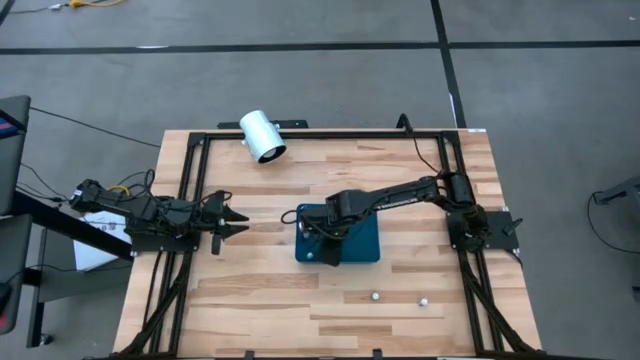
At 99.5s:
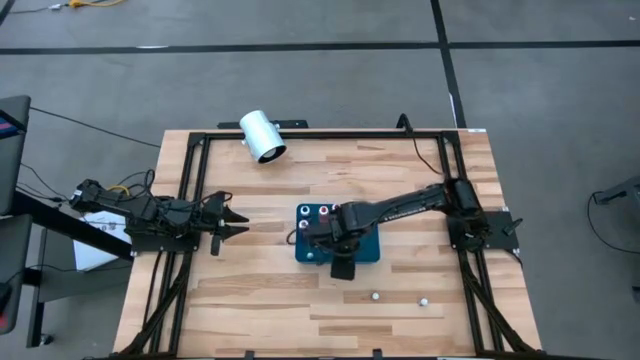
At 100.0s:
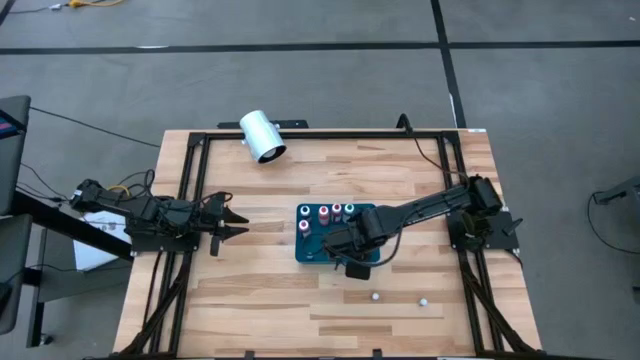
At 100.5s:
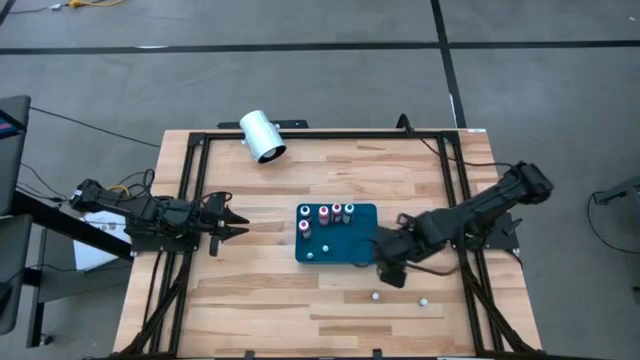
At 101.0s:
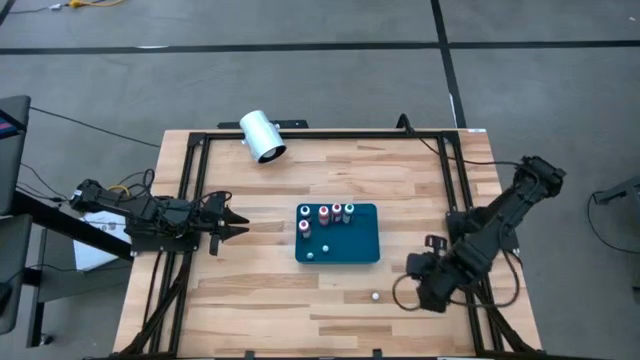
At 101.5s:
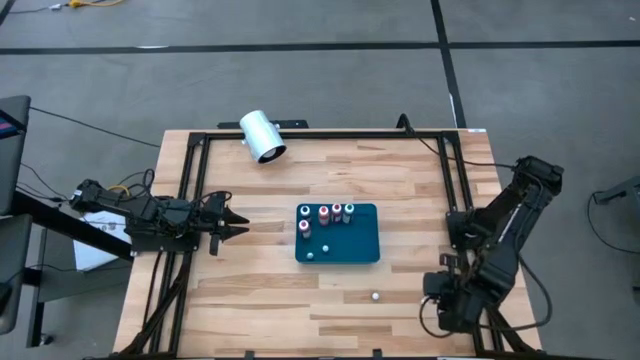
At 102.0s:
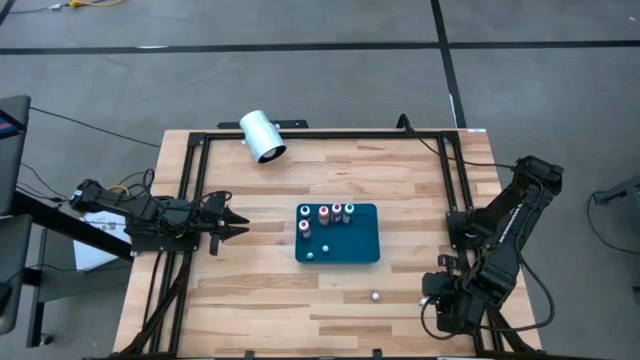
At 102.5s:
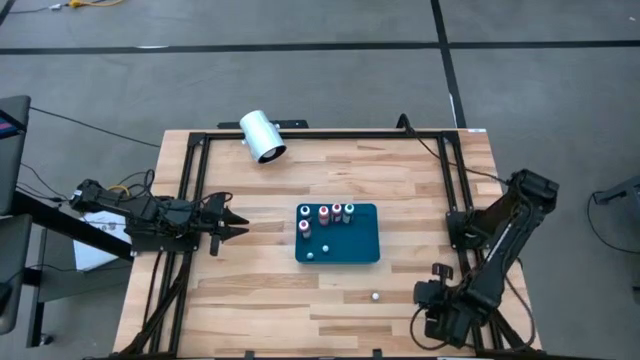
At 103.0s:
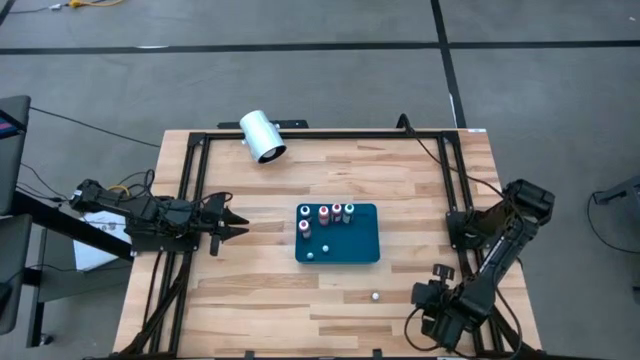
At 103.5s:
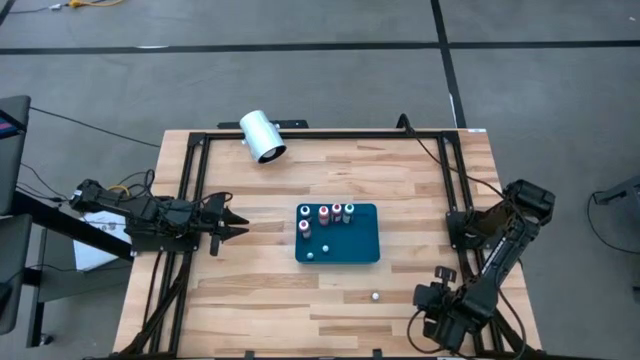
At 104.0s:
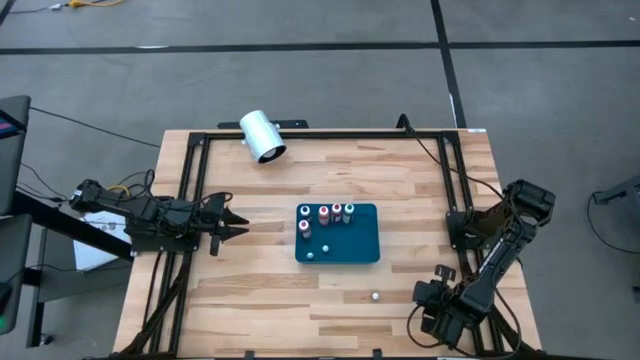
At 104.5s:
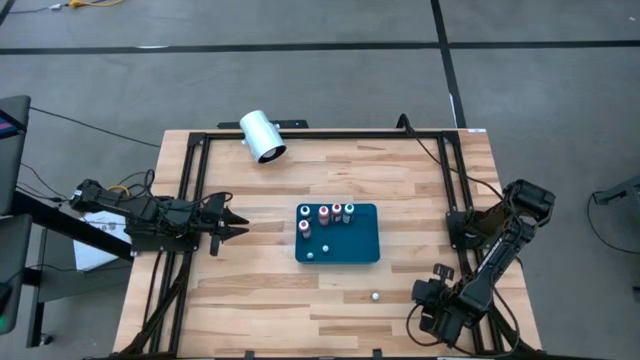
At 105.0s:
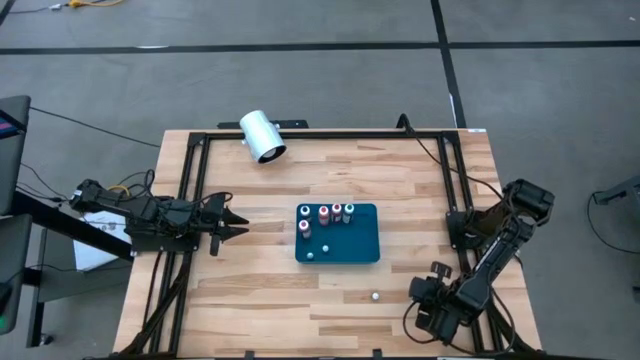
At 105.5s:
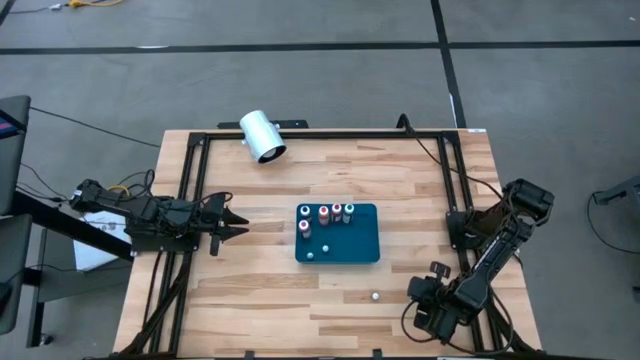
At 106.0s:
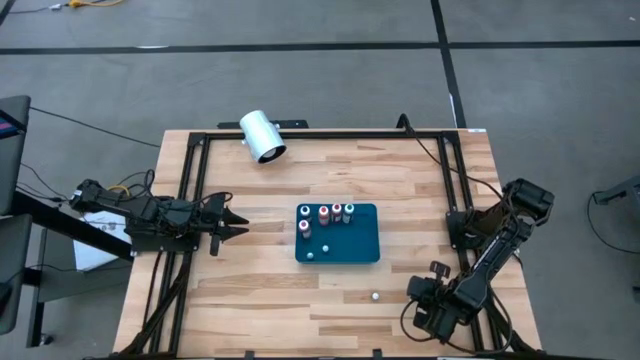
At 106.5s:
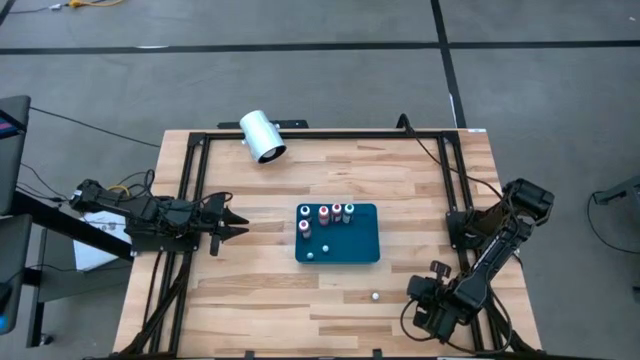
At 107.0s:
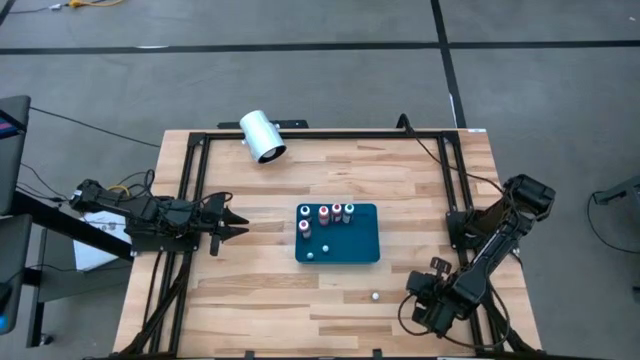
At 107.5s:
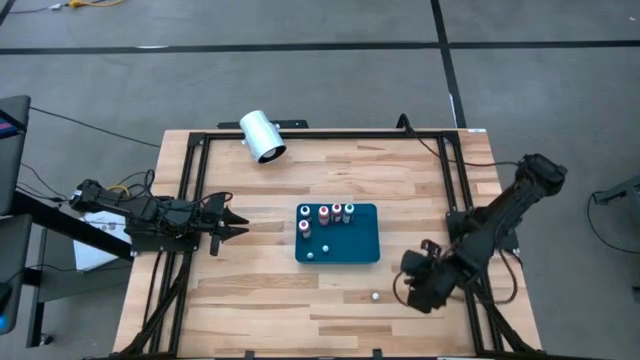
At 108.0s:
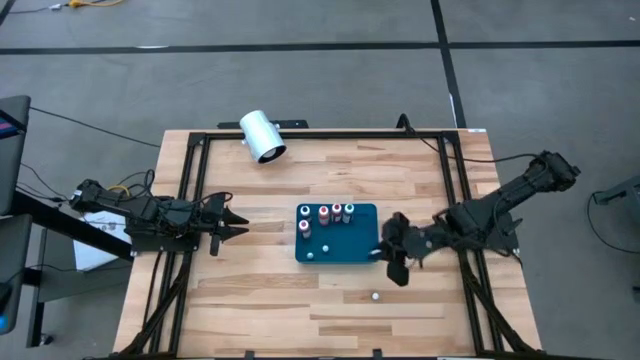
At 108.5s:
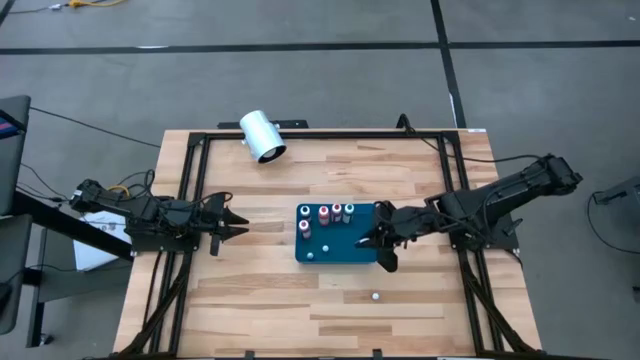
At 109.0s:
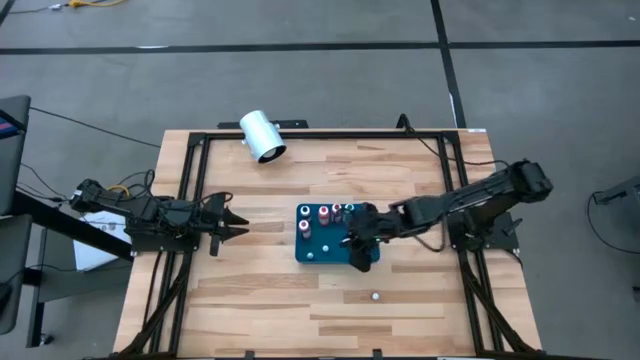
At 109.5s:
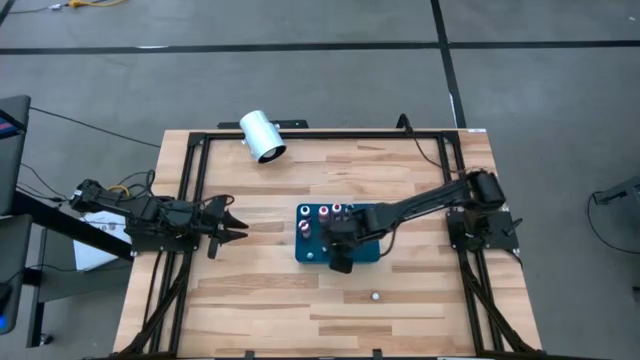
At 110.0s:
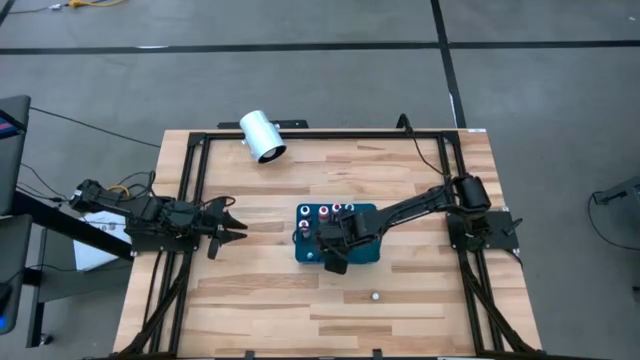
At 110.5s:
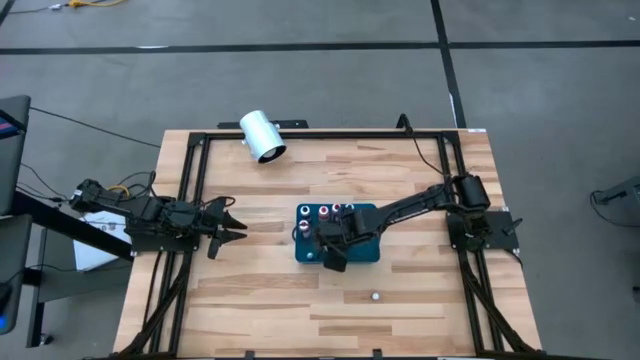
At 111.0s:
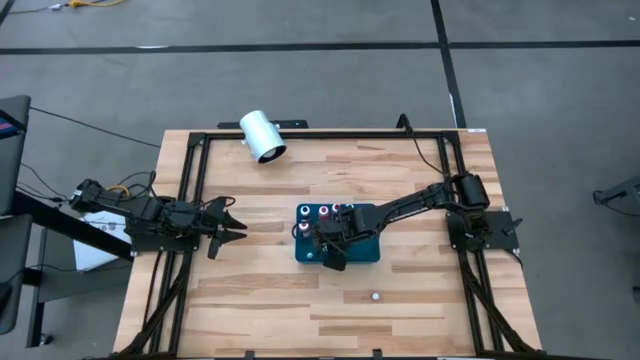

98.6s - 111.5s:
Task: Pick & Place food coloring
Put the small dark green food coloring bottle into the blue bin

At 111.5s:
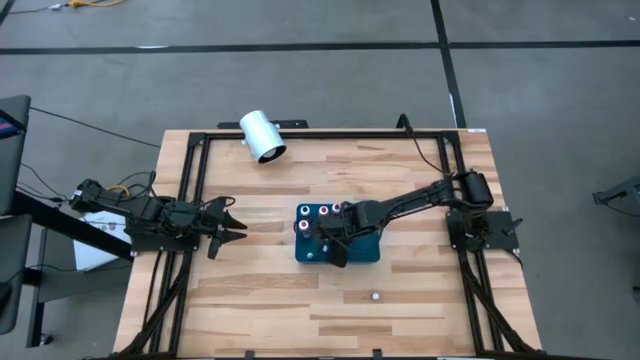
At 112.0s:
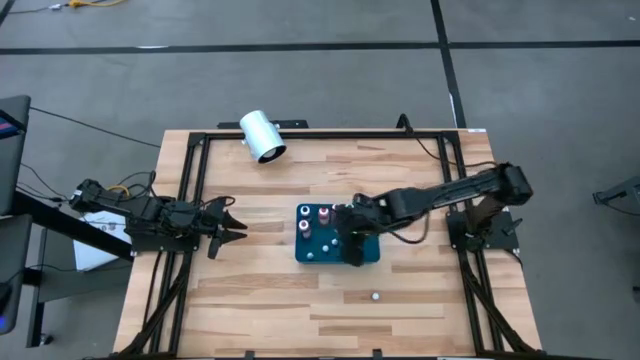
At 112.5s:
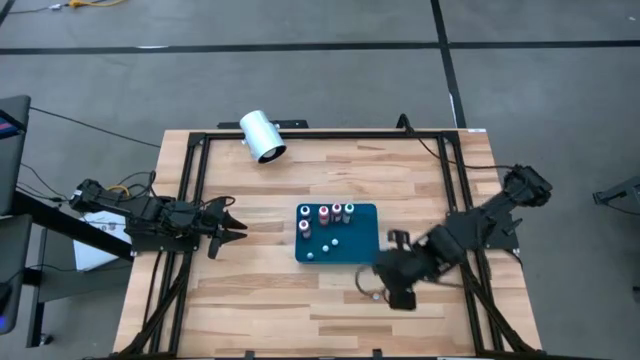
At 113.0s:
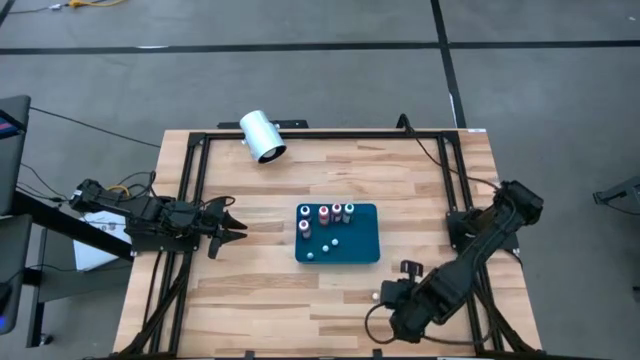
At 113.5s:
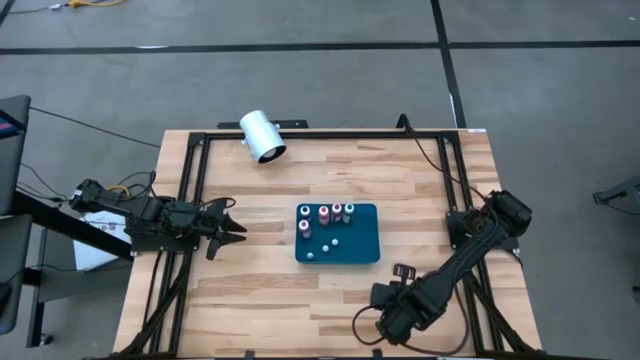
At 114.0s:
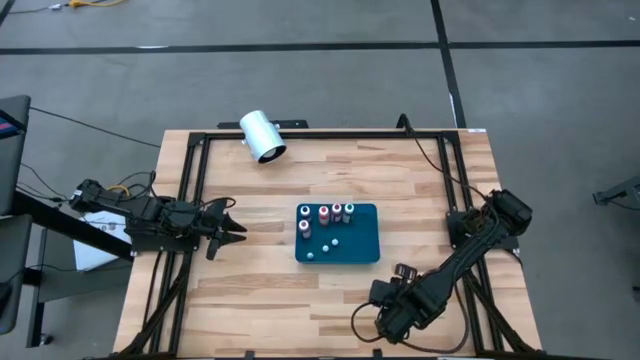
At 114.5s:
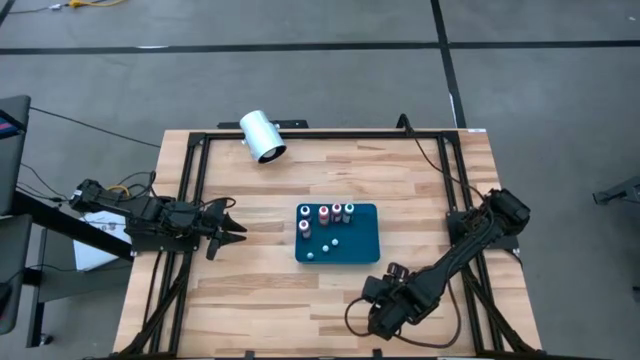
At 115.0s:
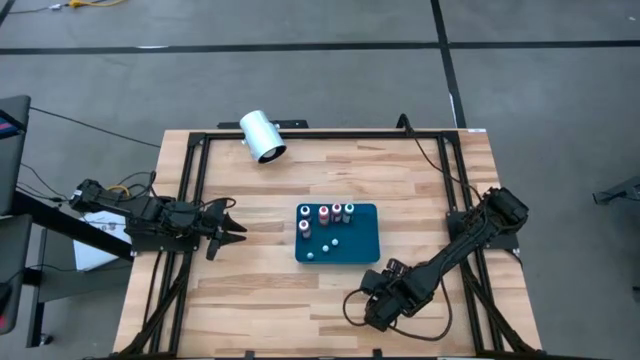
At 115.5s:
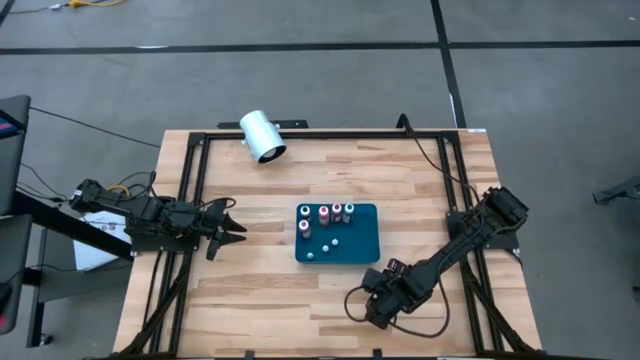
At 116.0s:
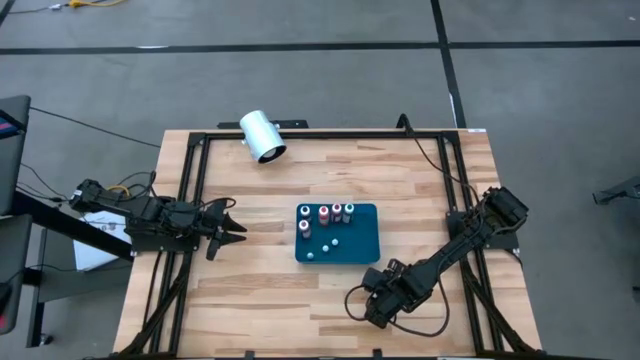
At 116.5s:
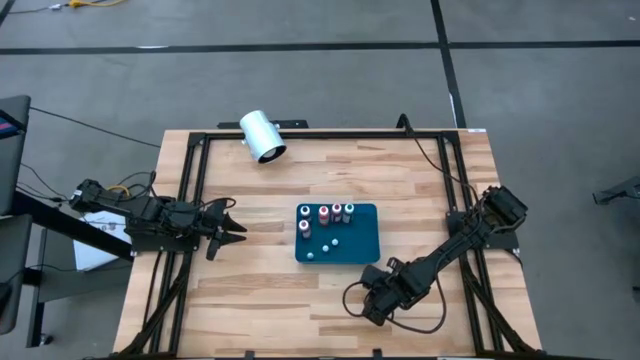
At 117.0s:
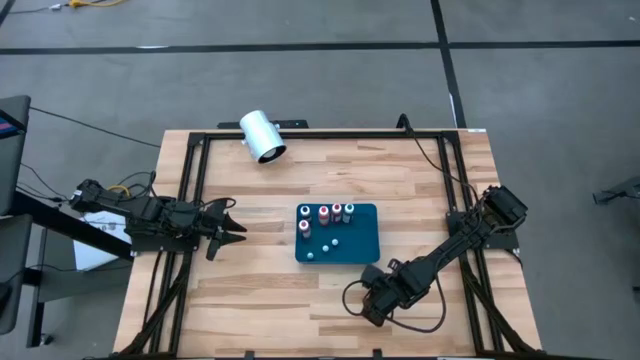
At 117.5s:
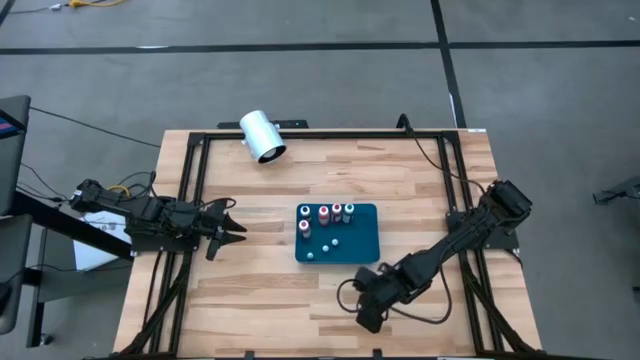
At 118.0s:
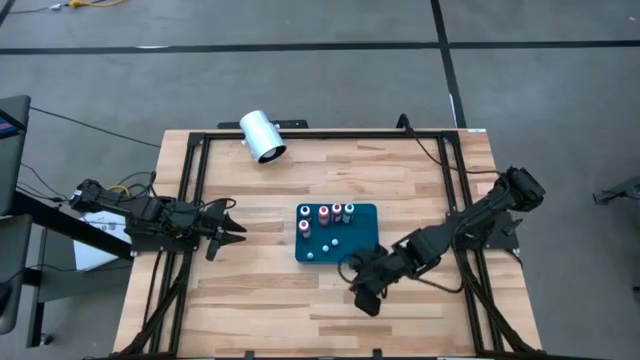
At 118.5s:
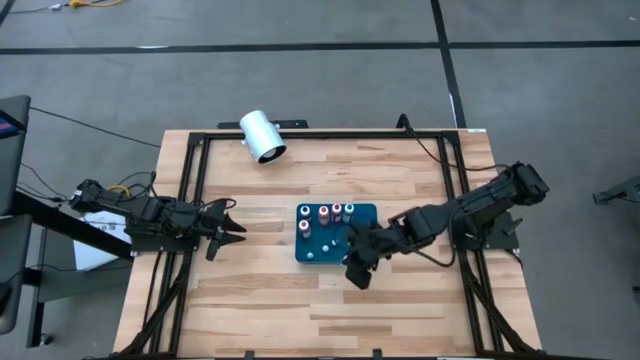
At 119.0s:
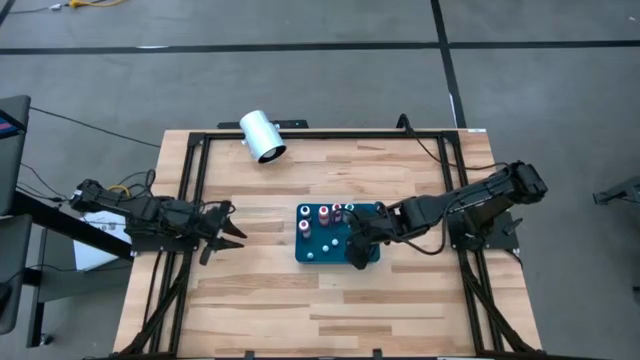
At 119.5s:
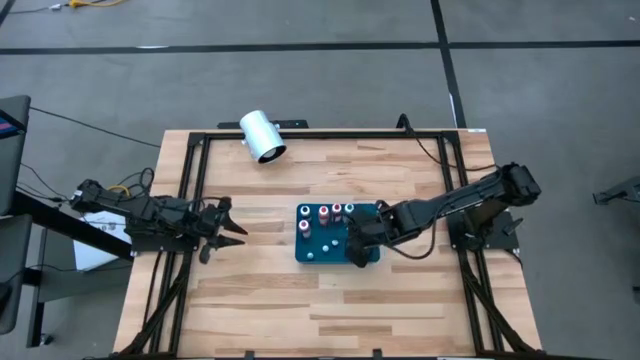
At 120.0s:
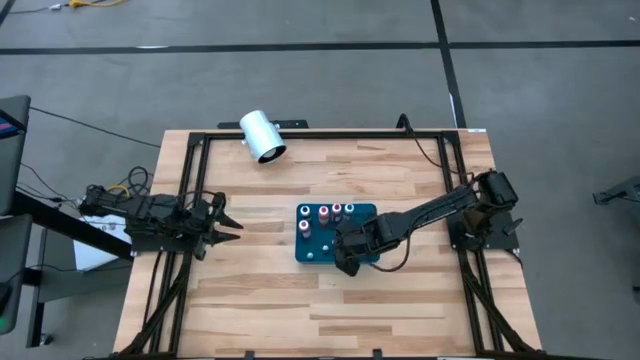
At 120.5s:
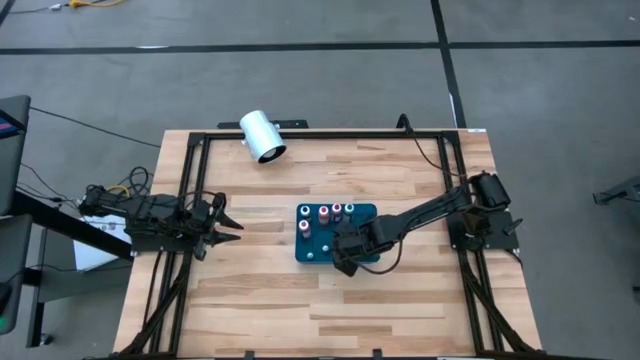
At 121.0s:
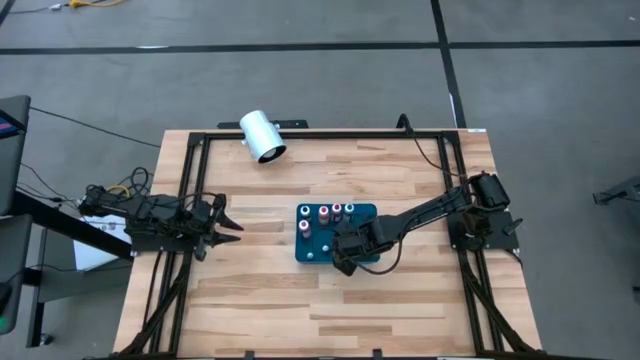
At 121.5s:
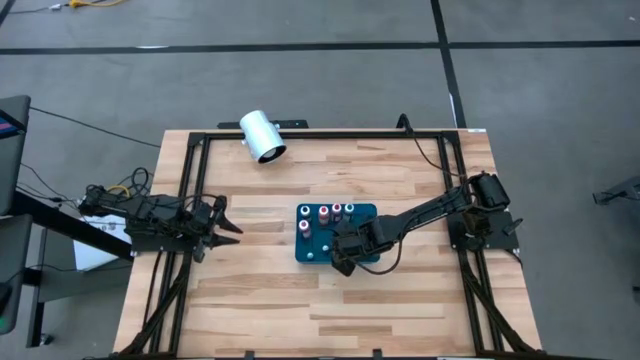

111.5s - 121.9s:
Put the small green food coloring bottle into the blue bin

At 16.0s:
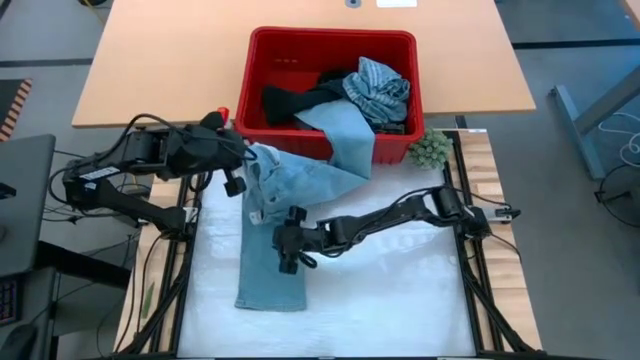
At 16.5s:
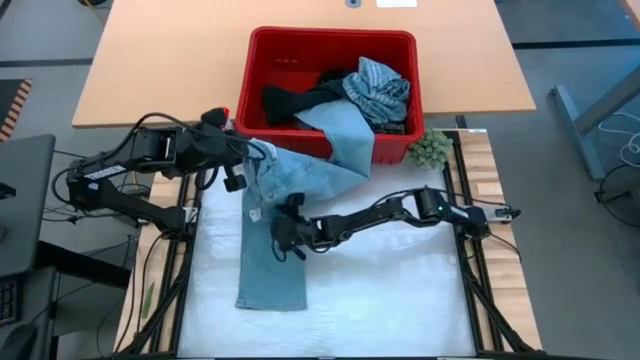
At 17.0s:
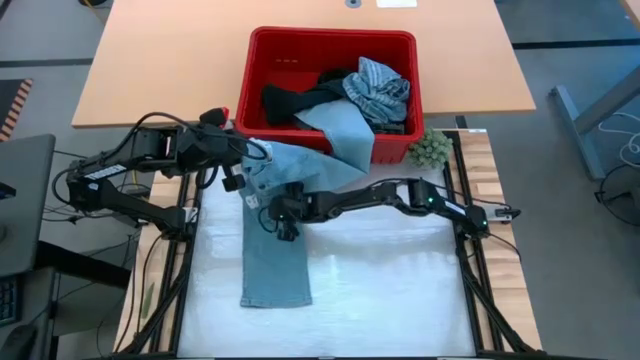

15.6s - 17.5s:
Task: Fold laundry
Fold the blue pants from the red laundry bin
